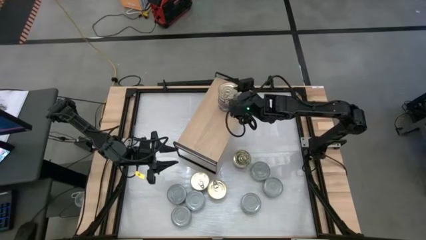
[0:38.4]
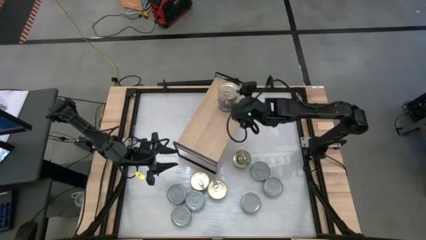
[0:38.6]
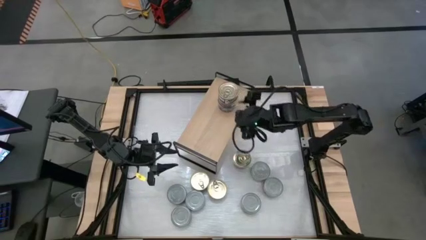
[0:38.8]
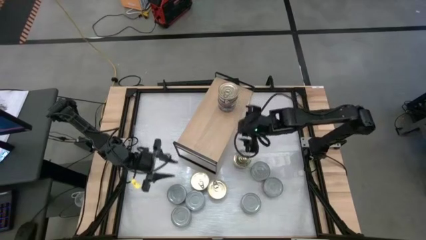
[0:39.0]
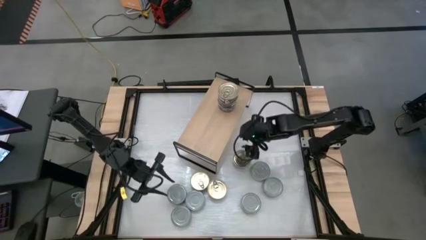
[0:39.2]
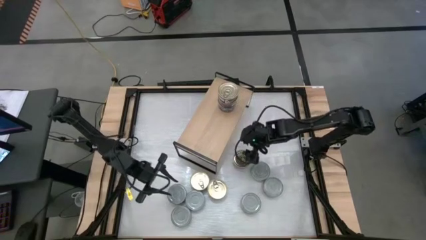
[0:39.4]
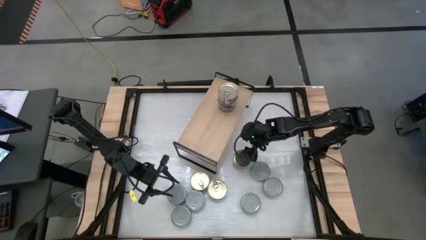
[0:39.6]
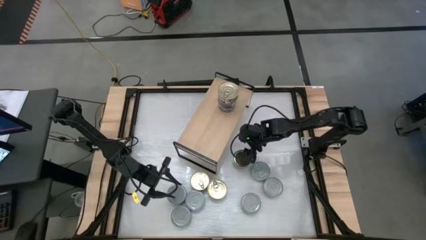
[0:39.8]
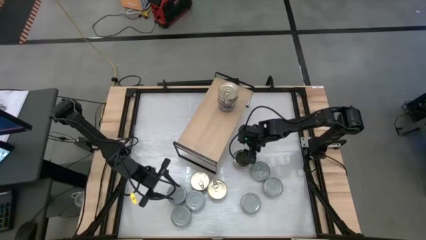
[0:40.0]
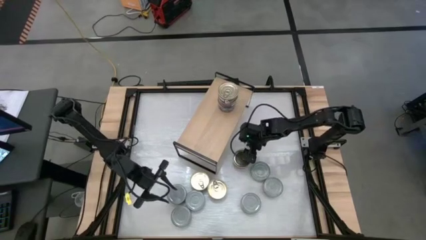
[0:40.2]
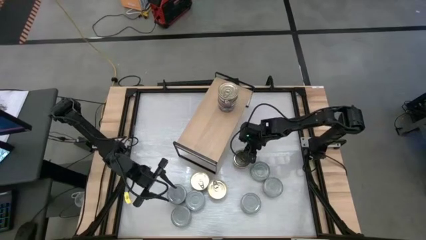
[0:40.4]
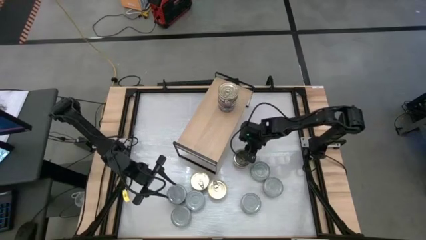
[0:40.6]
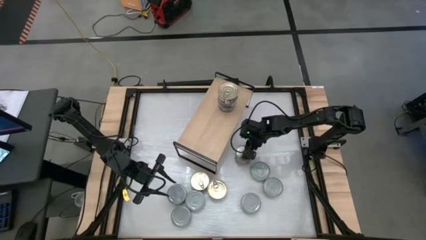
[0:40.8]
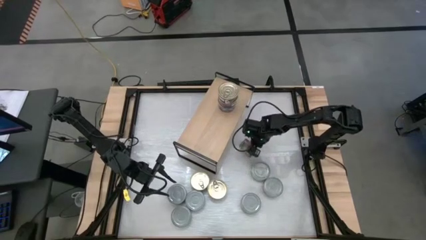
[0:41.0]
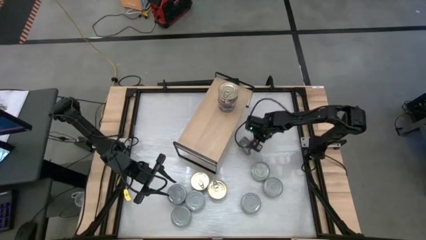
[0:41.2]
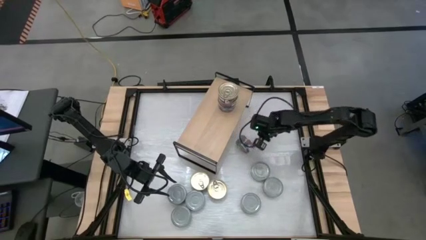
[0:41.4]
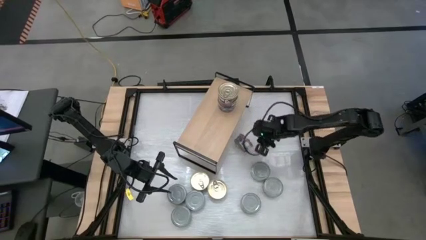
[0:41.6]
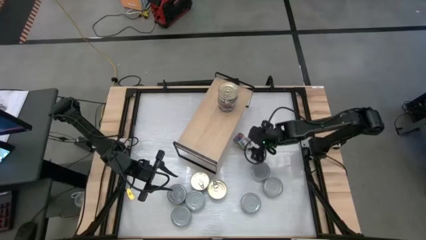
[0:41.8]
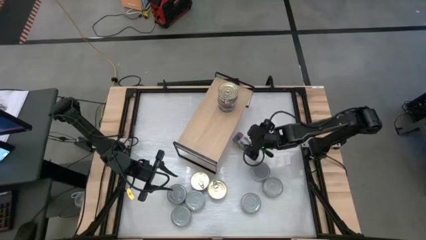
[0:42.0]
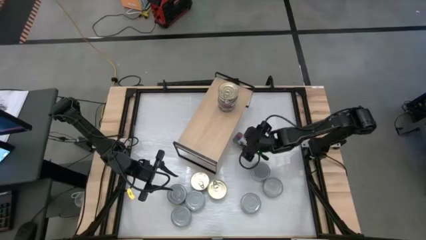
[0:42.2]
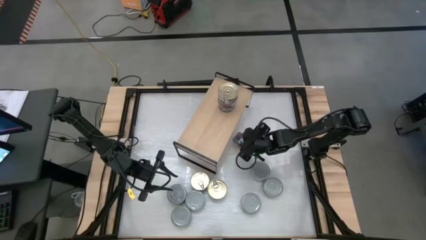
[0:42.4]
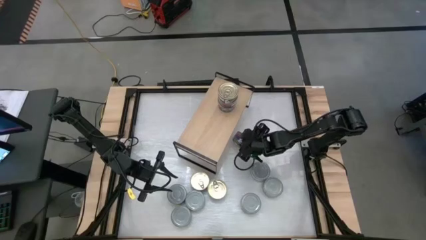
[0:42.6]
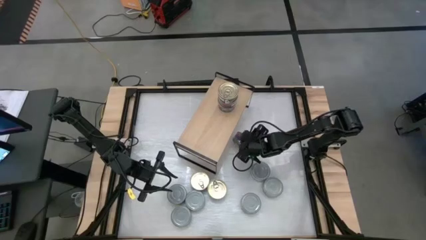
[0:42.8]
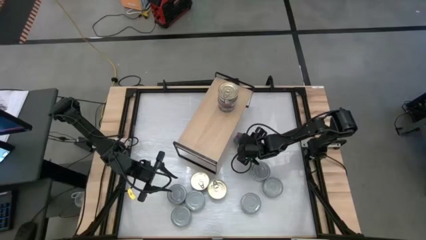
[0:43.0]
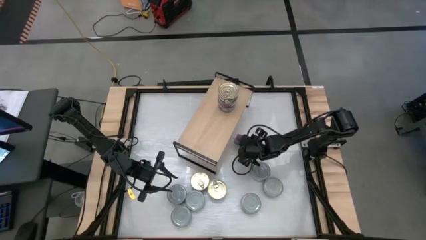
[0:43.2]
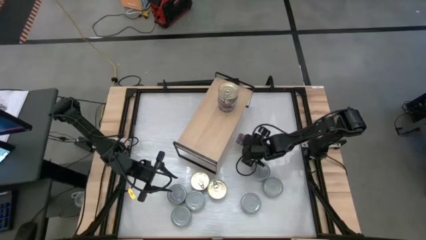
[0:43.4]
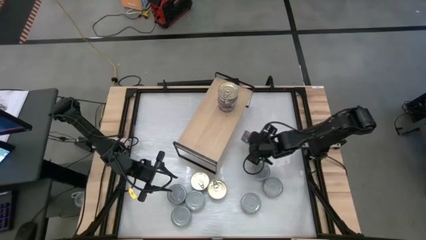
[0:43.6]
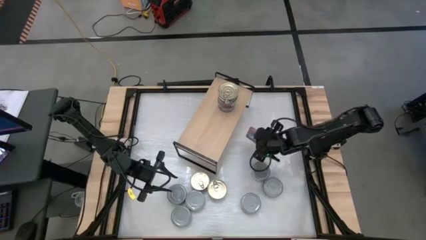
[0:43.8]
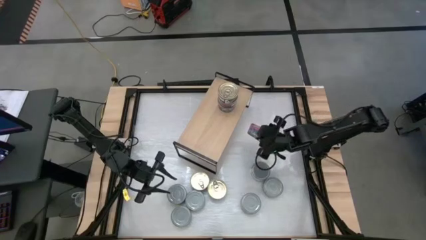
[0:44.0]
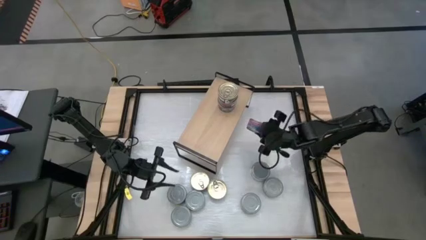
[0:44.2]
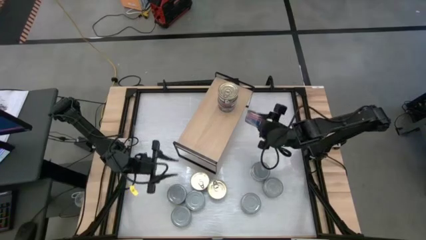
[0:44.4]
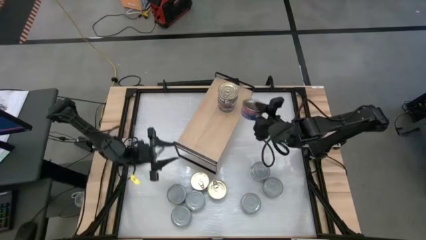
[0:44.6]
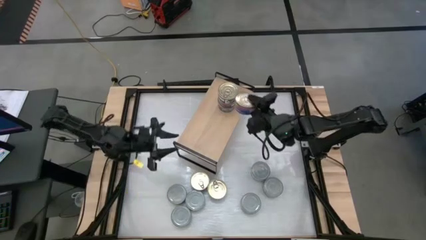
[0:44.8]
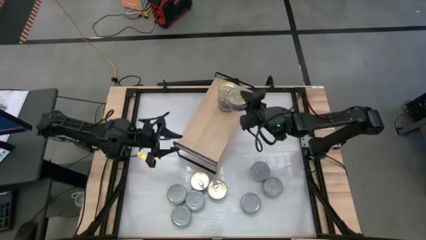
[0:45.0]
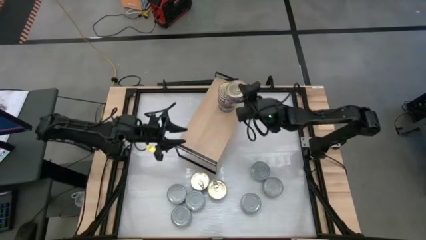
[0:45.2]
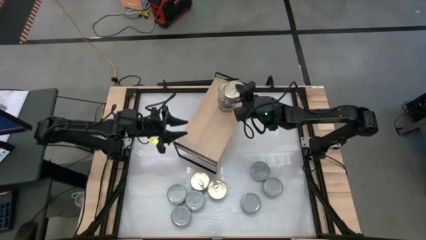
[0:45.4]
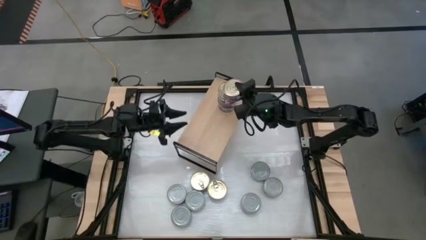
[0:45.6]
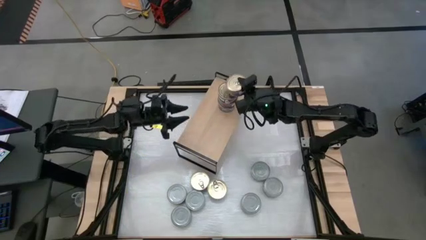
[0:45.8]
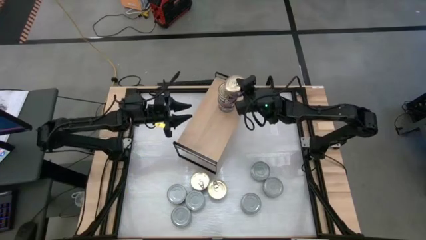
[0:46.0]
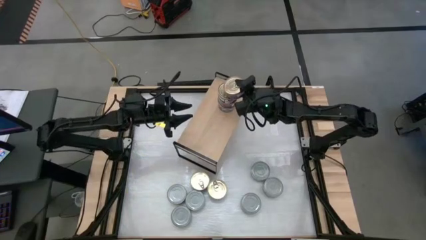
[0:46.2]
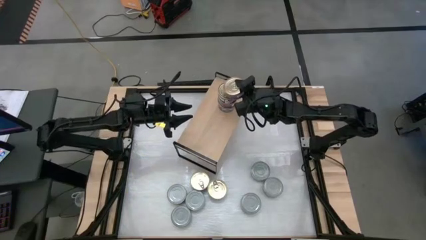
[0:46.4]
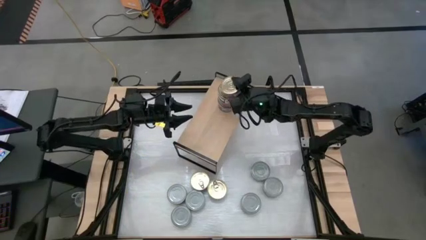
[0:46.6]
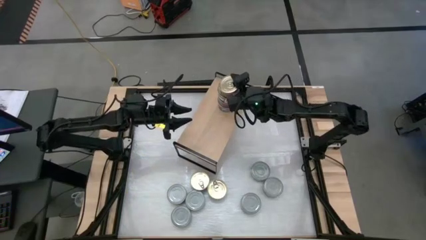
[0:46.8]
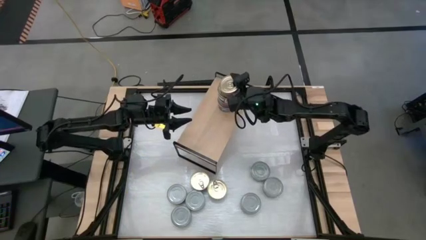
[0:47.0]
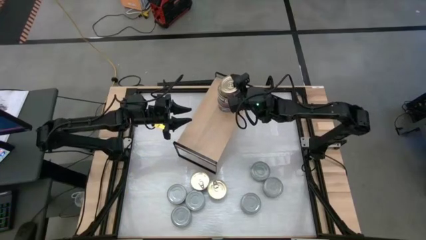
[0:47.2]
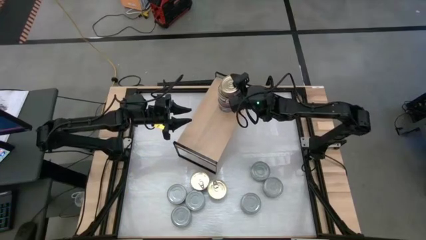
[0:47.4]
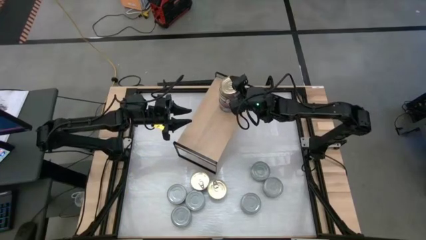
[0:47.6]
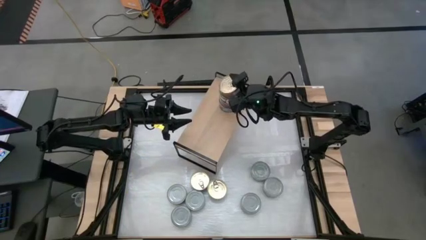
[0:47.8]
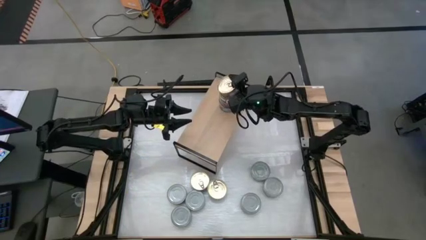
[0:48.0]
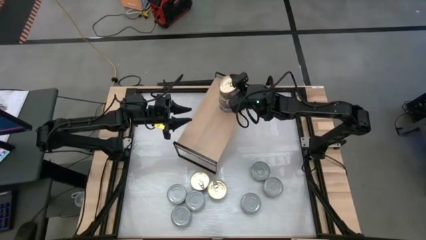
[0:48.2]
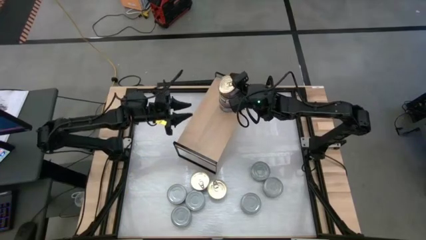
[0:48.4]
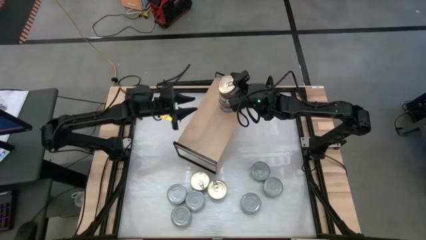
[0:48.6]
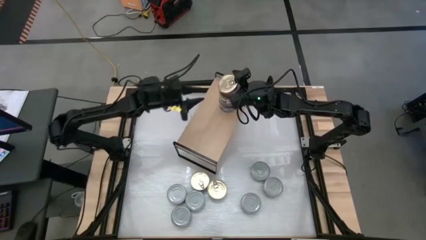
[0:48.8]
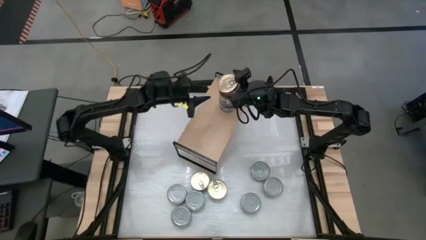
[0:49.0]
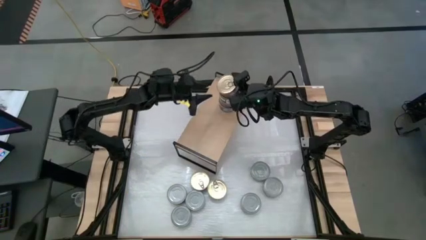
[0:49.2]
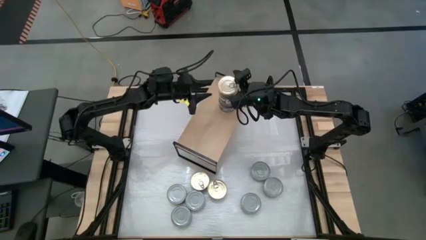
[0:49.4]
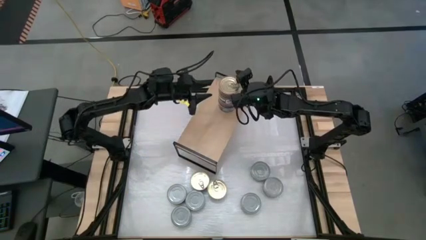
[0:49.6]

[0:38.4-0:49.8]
Task: Stack canned seafood by type on shelf
Stack the blue tuna can on top of the stacked blue tuna cans on the shelf
